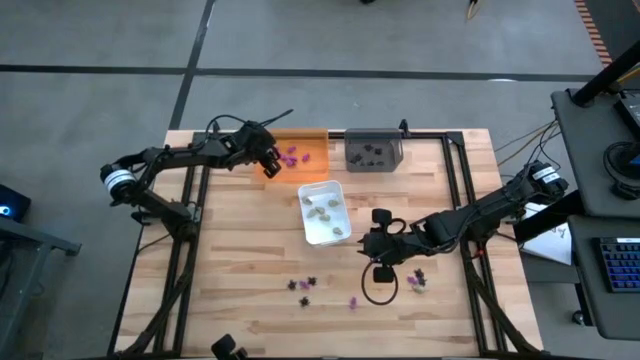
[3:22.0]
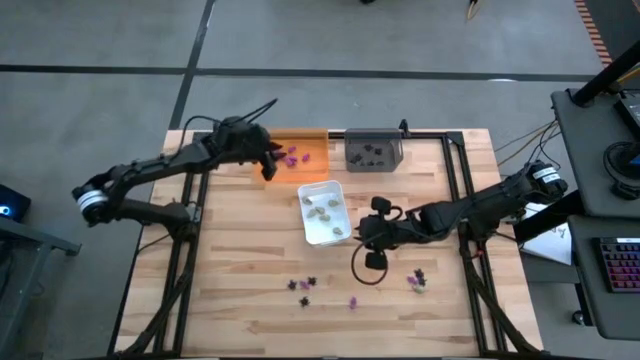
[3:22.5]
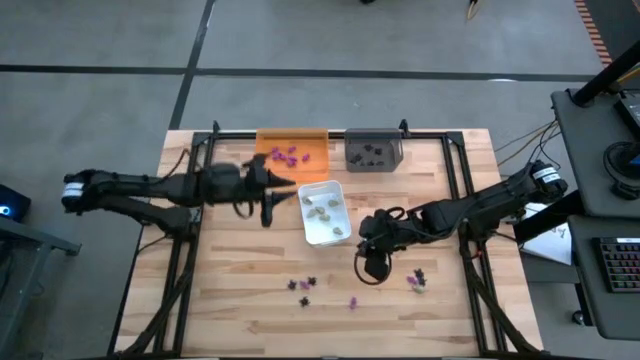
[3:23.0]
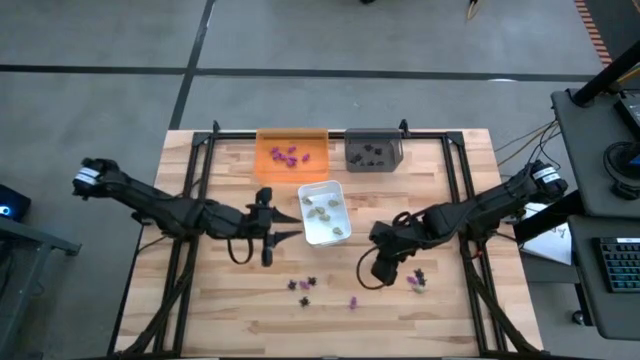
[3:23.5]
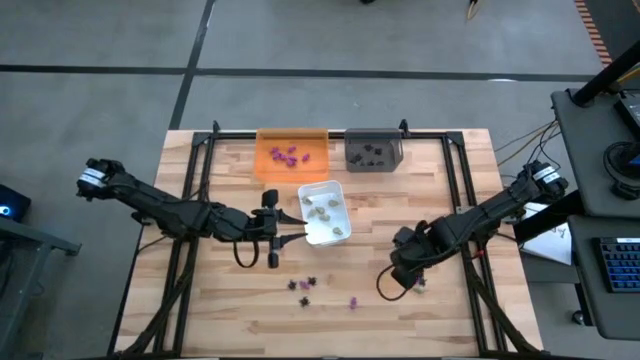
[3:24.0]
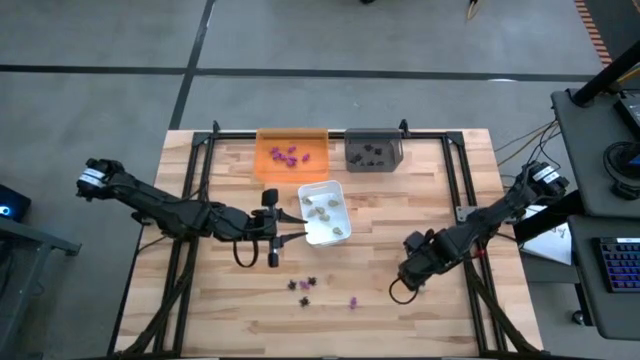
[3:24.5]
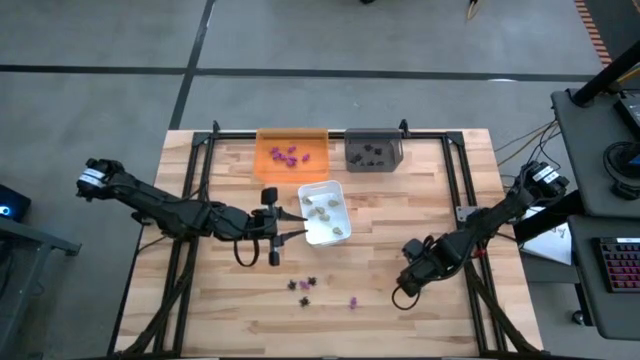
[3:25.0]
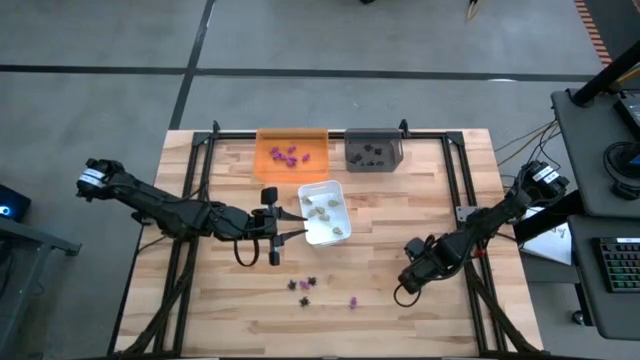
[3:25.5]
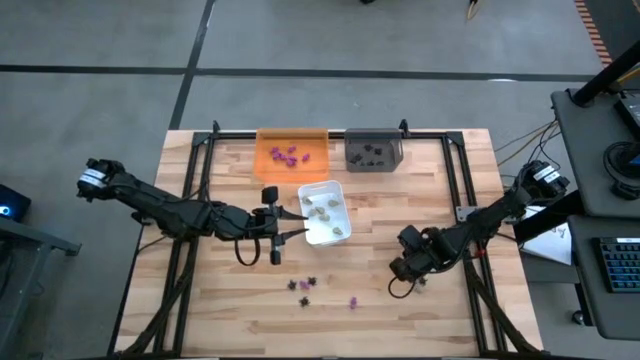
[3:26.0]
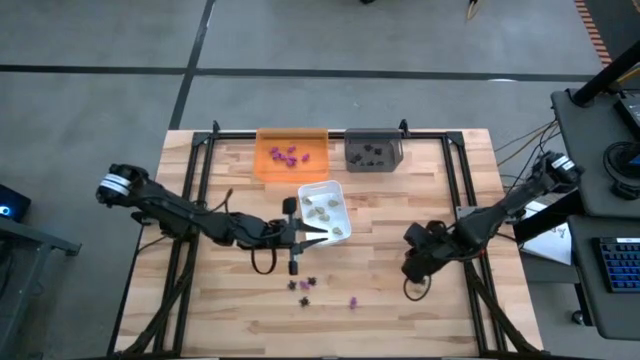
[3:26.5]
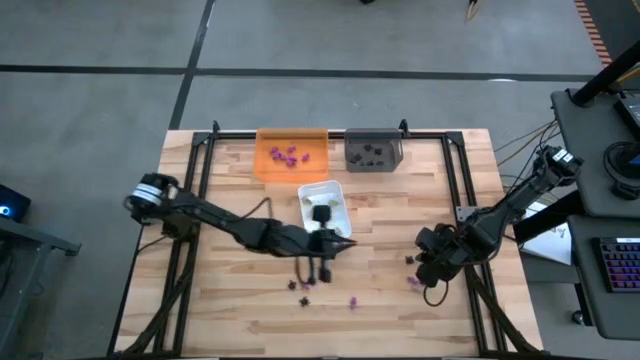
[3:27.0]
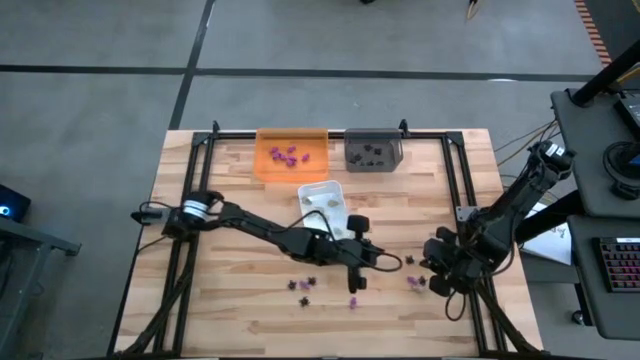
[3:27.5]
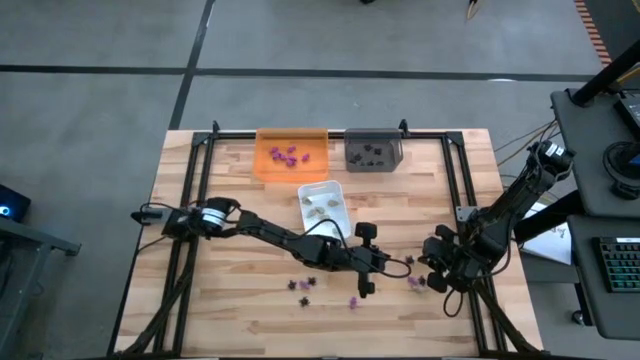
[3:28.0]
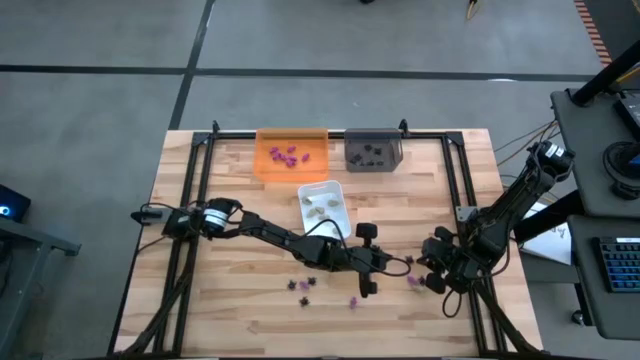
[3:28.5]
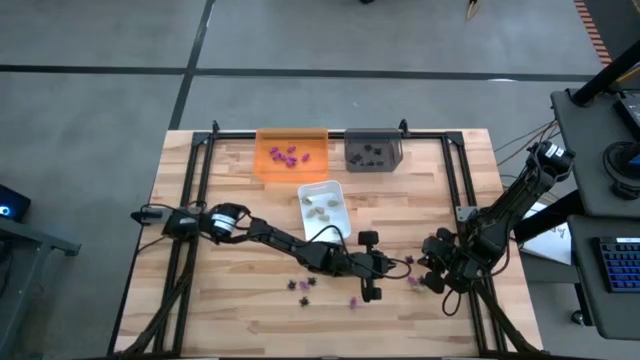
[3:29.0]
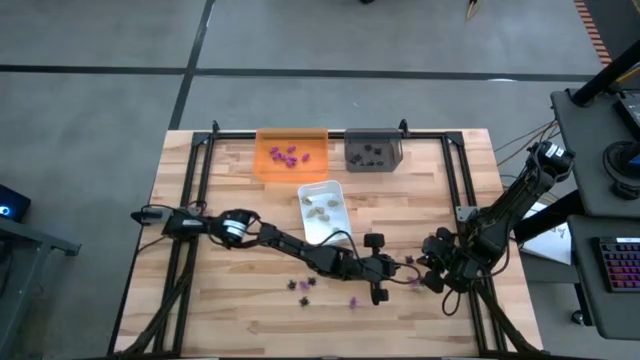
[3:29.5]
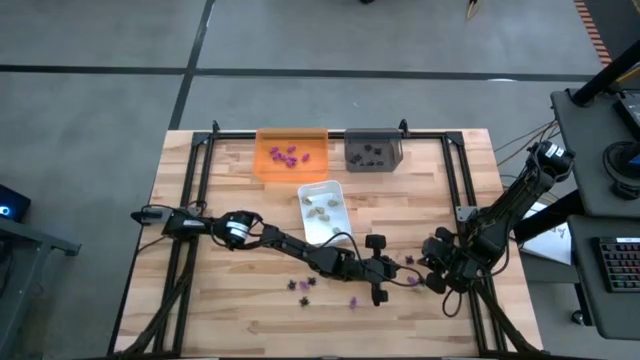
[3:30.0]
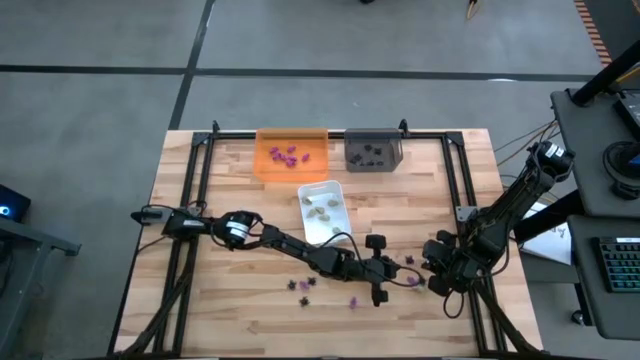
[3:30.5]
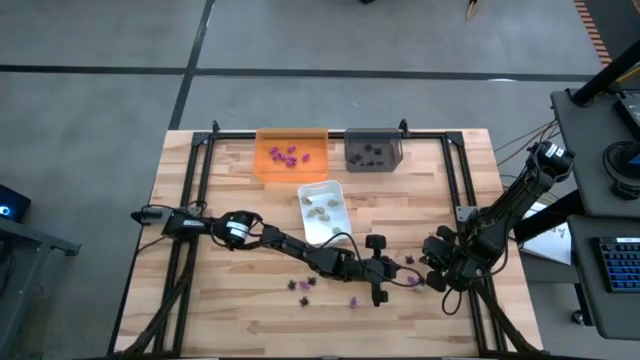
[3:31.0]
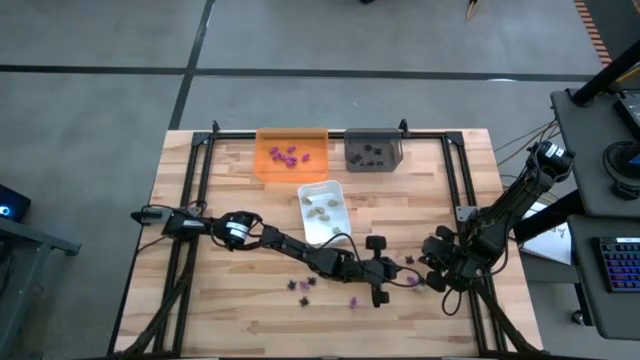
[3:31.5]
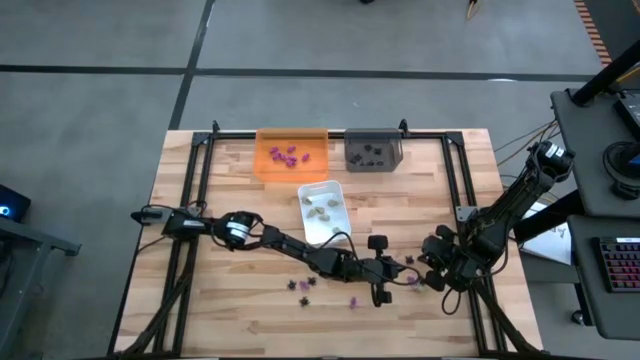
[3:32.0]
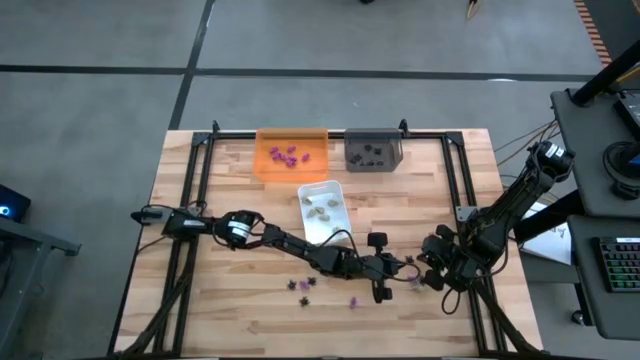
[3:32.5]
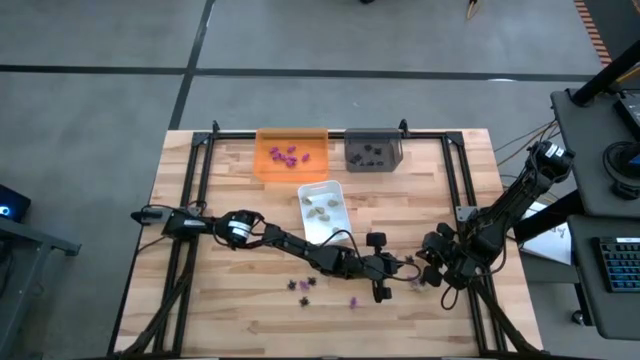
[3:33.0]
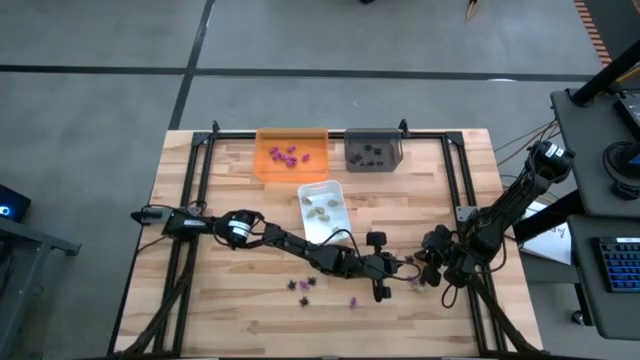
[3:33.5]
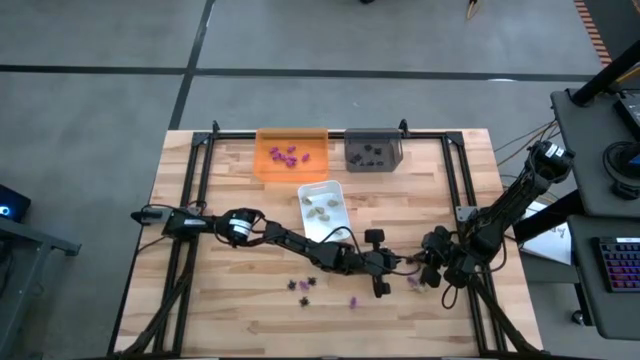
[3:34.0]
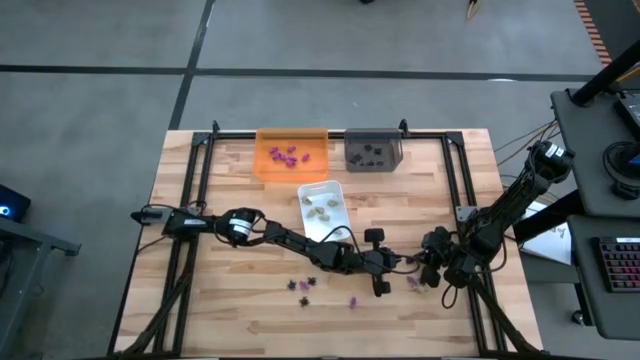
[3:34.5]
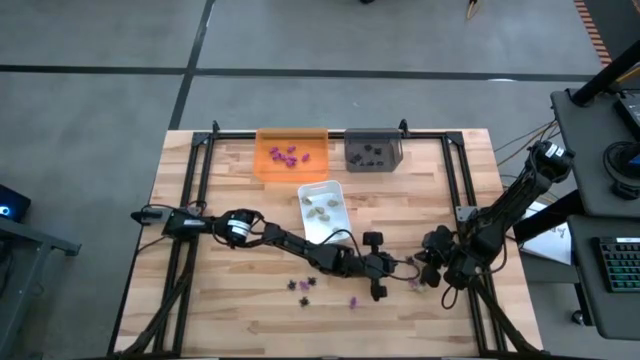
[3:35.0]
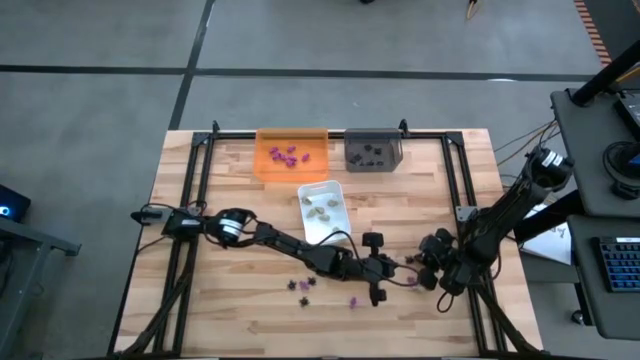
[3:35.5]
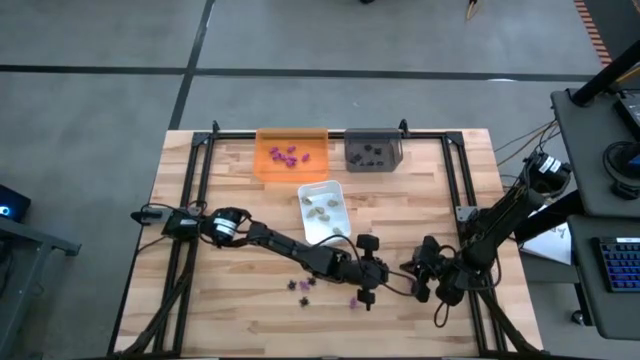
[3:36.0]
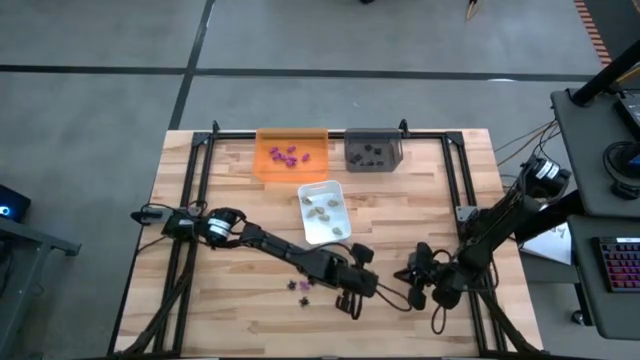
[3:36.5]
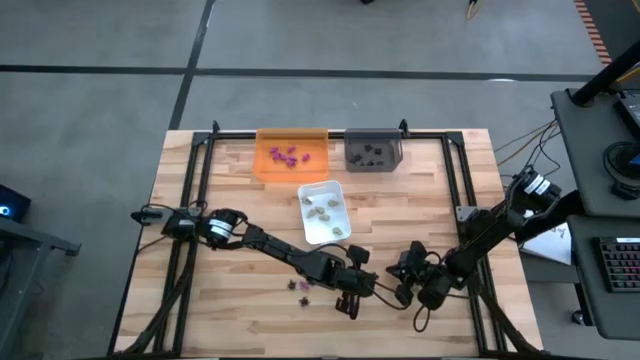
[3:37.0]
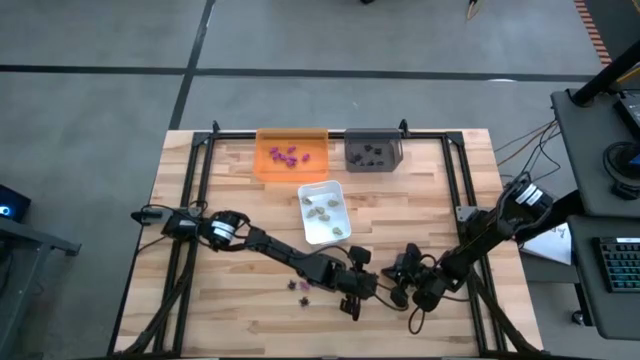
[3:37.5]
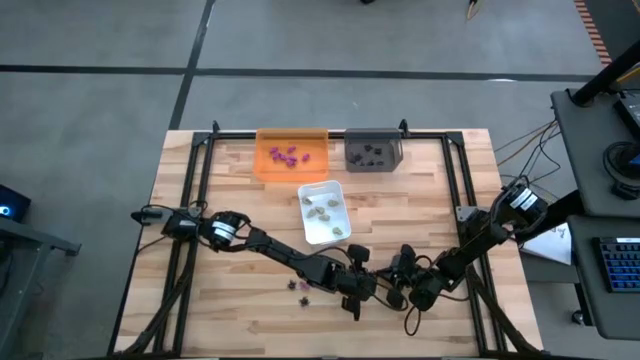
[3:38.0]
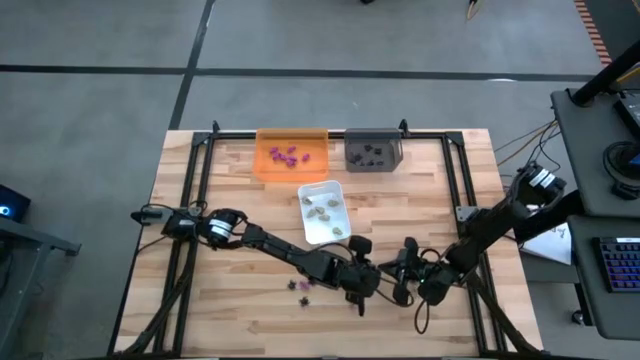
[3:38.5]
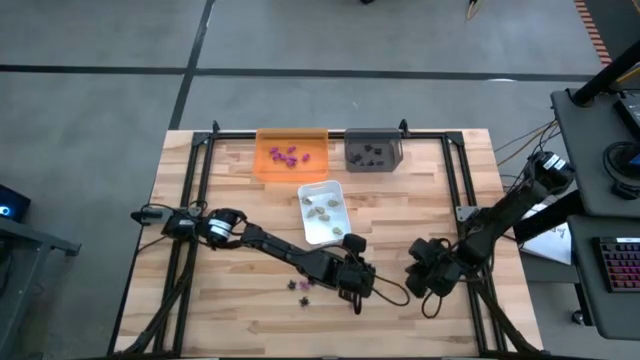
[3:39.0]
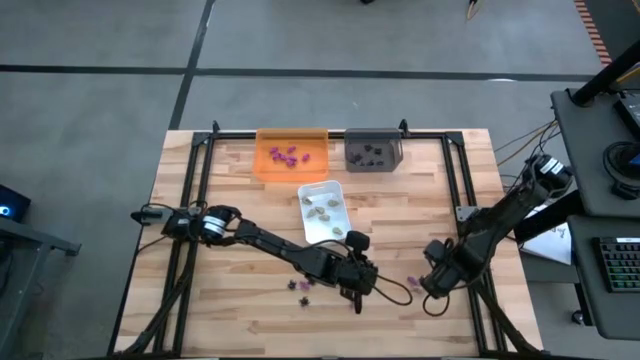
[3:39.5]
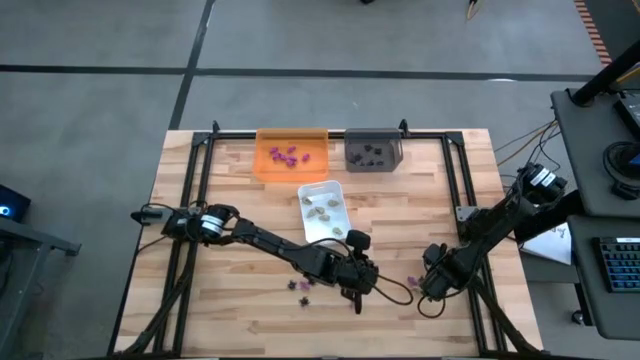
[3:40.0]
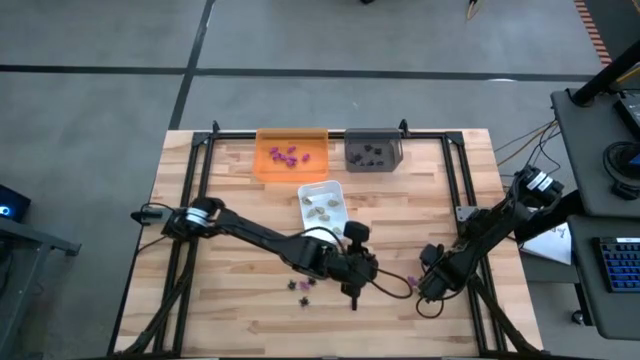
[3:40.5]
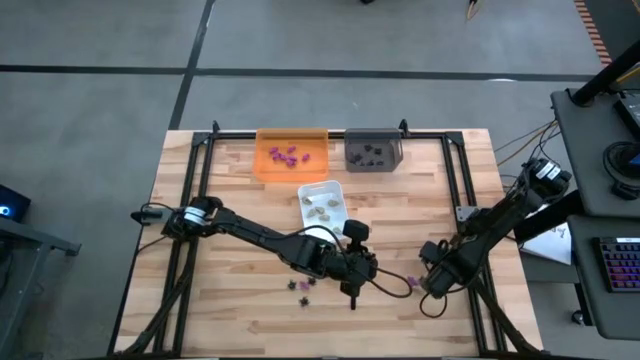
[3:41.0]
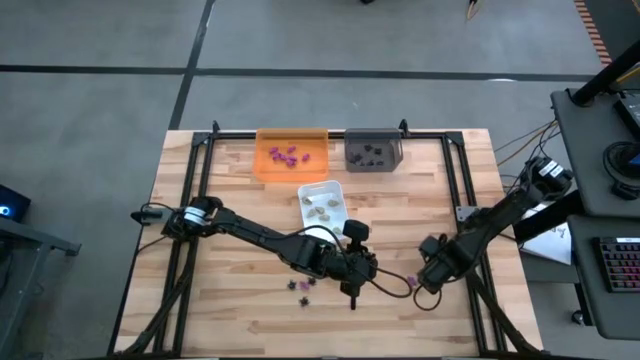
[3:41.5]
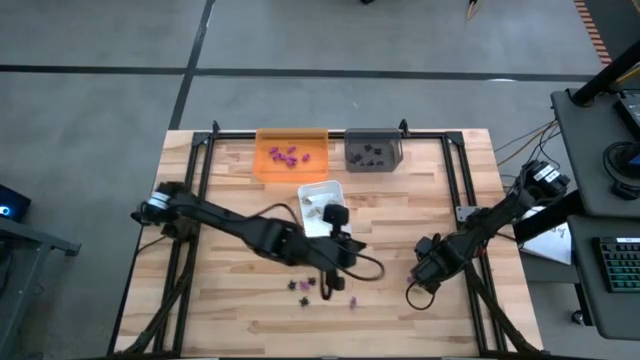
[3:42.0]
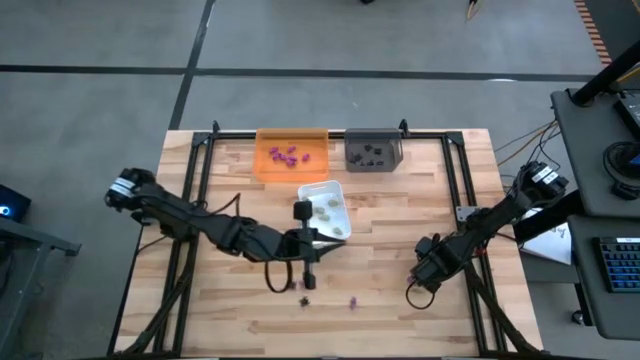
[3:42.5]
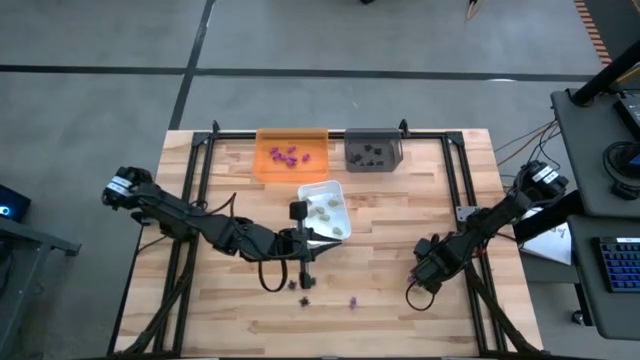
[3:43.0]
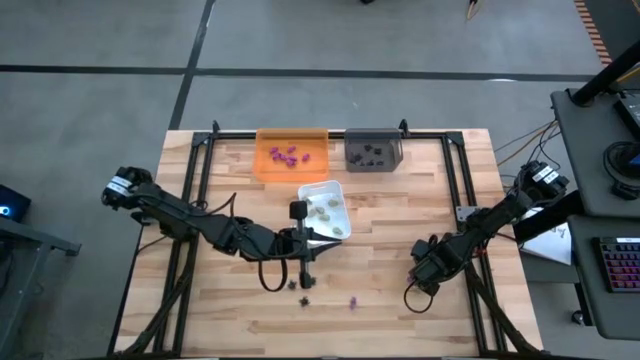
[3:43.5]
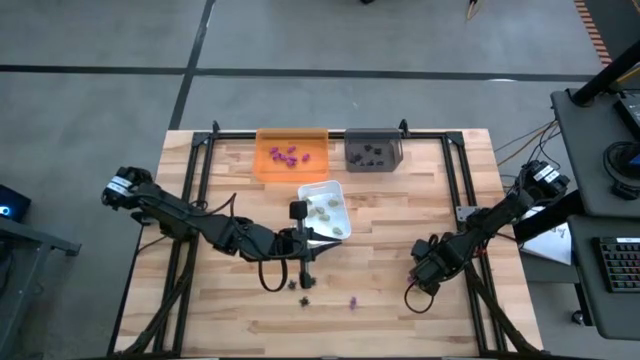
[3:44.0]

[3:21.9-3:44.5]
Task: Sort Halloween decoration
Put the black spider toy into the black bin
